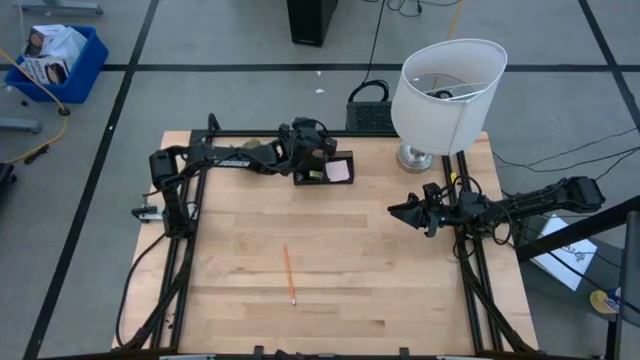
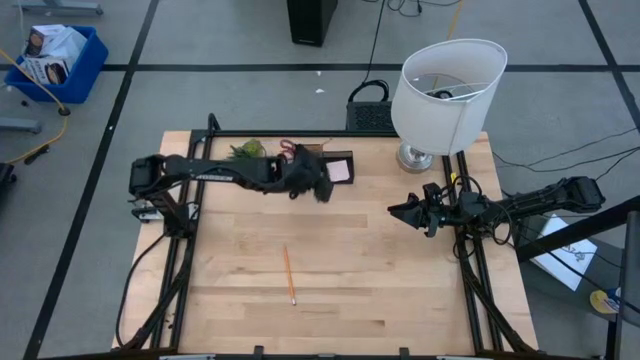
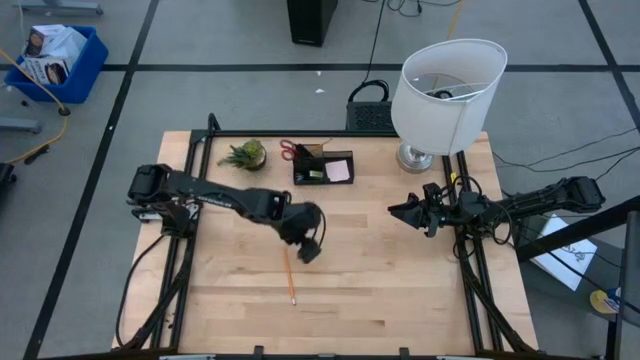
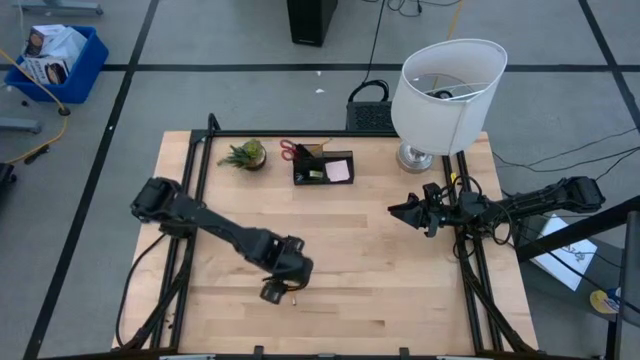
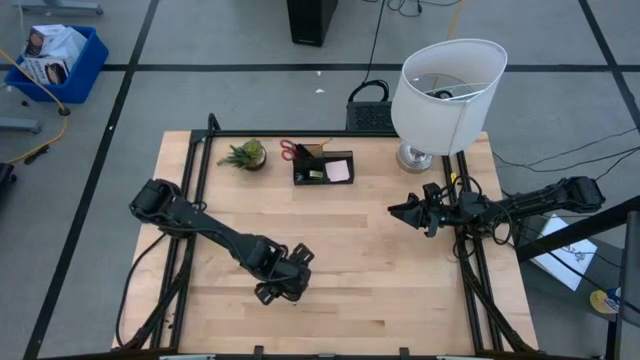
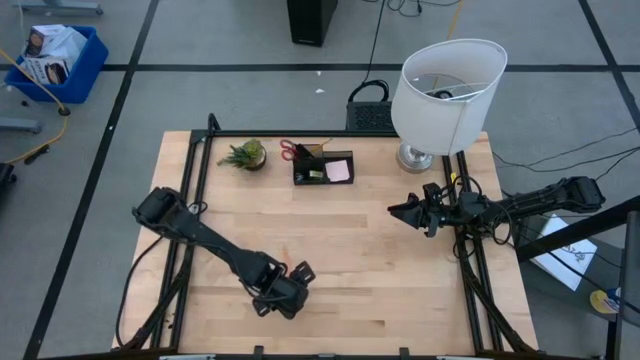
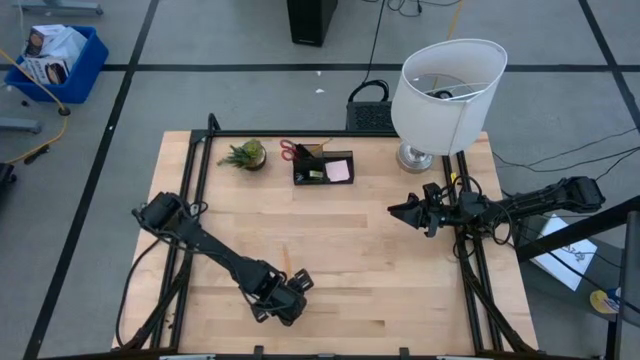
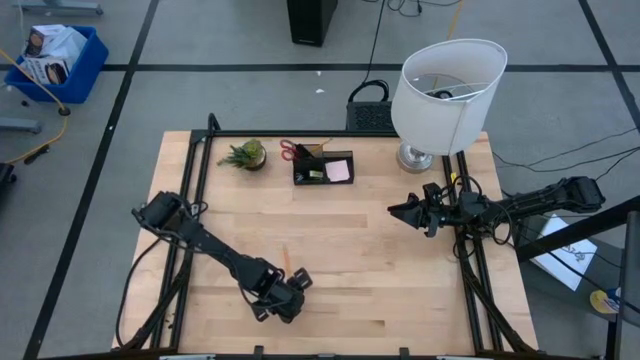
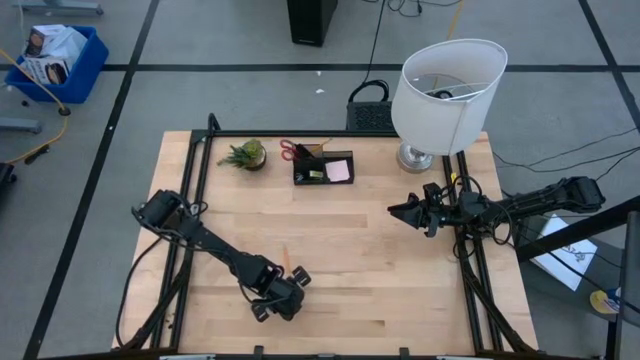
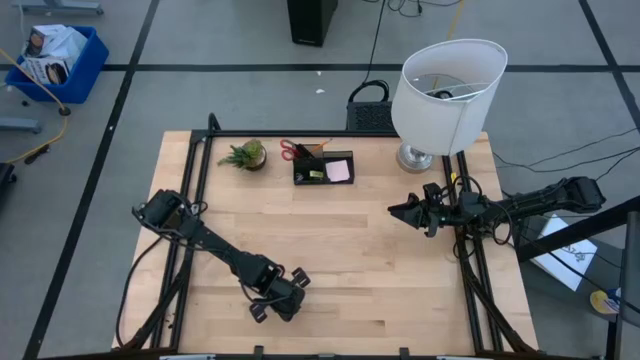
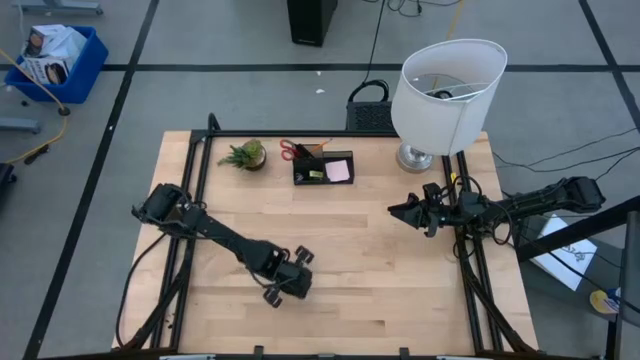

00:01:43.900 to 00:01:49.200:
Task: Pick and place office supplies into organizer
Put the orange pencil into the black desk organizer

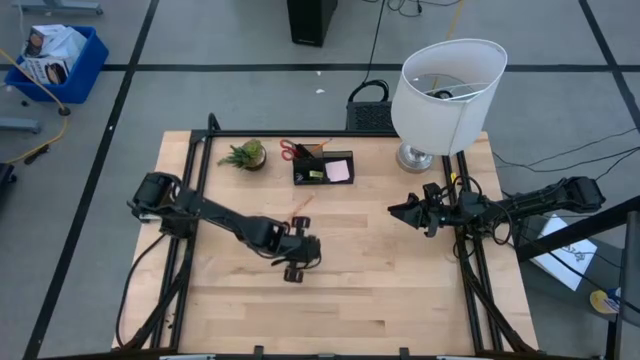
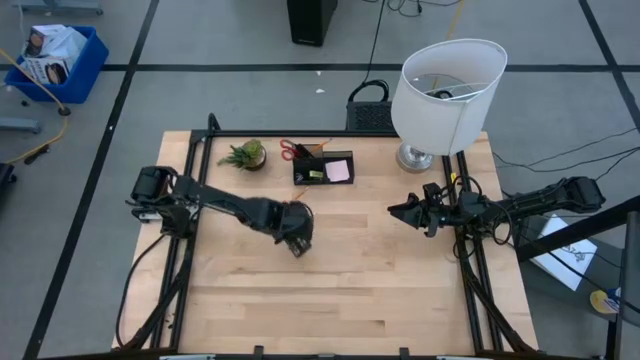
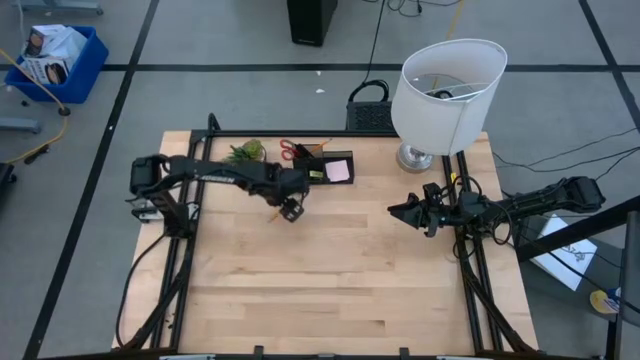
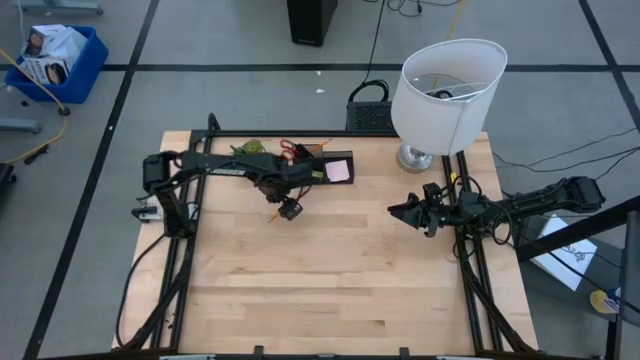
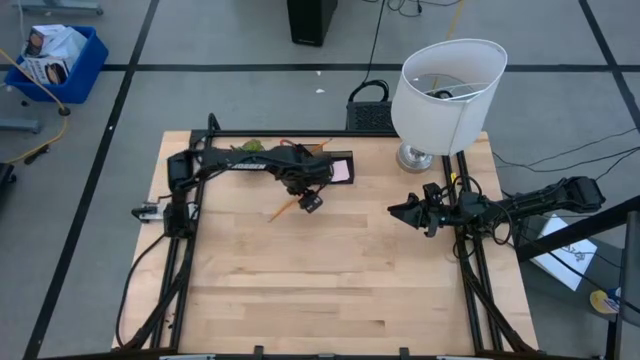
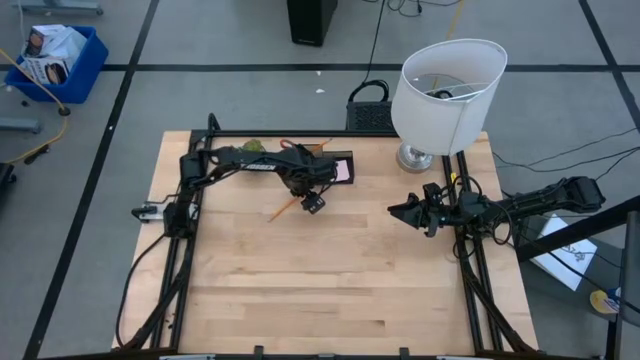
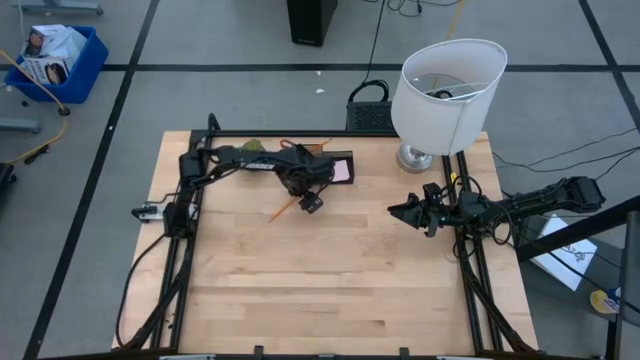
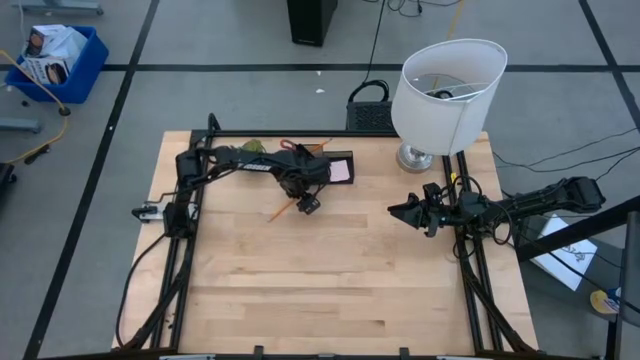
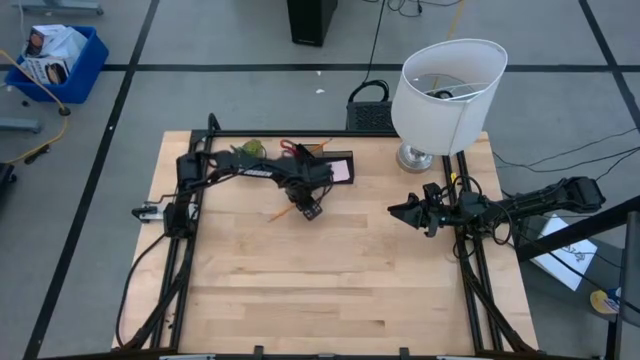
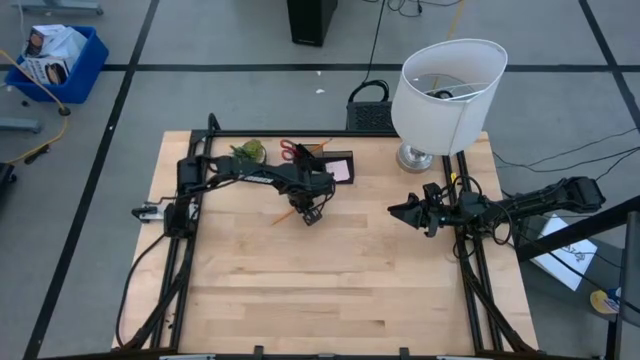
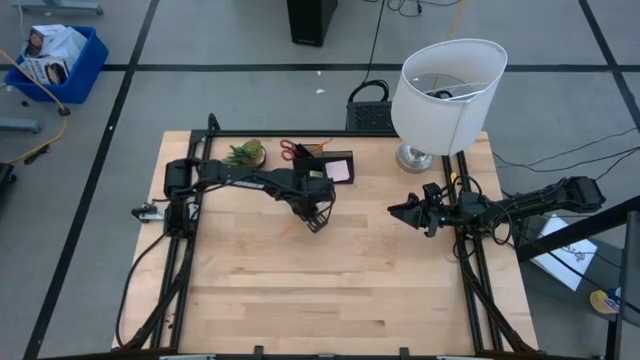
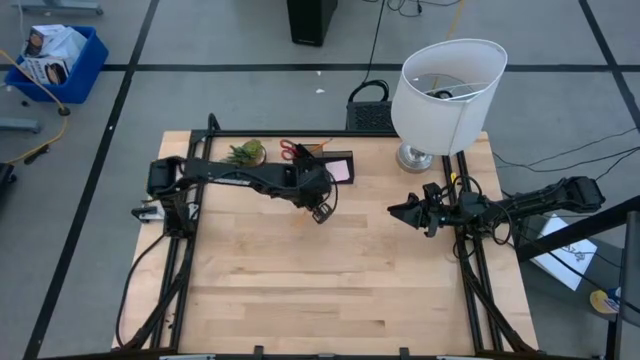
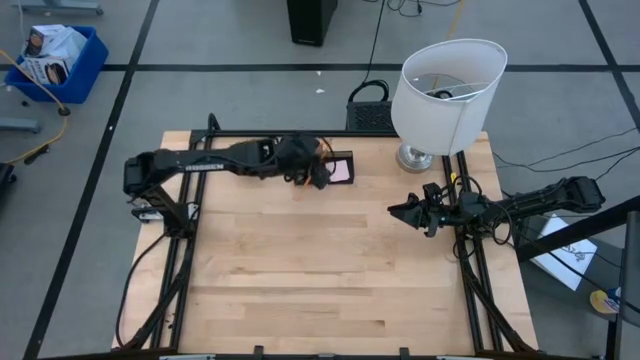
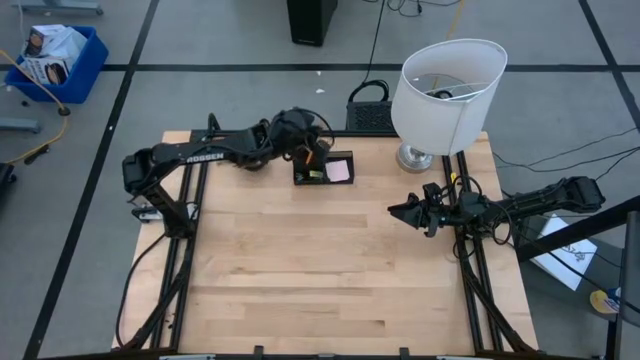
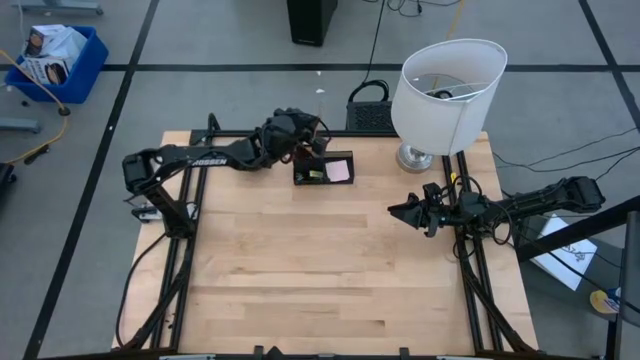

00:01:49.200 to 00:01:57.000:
Put the orange pencil into the black desk organizer

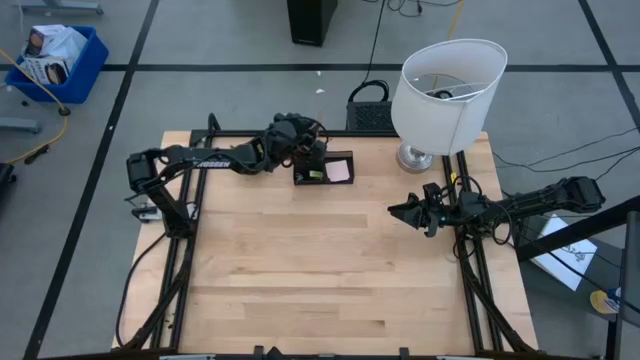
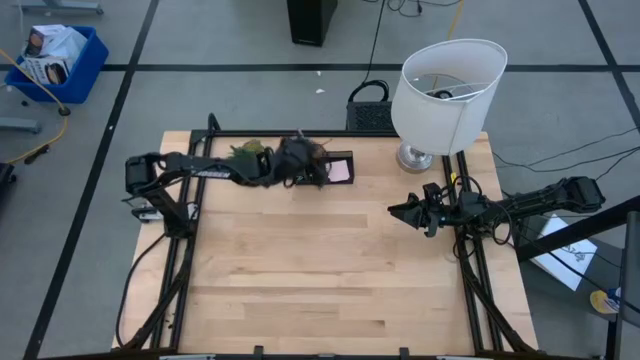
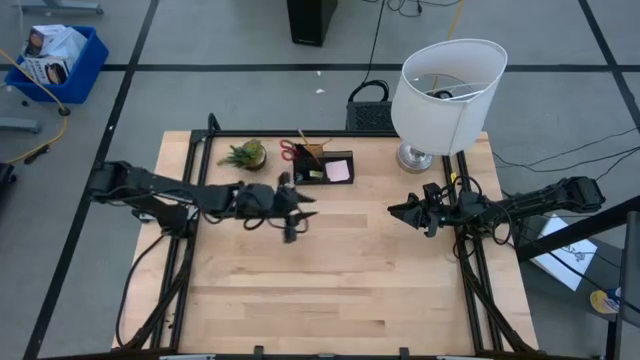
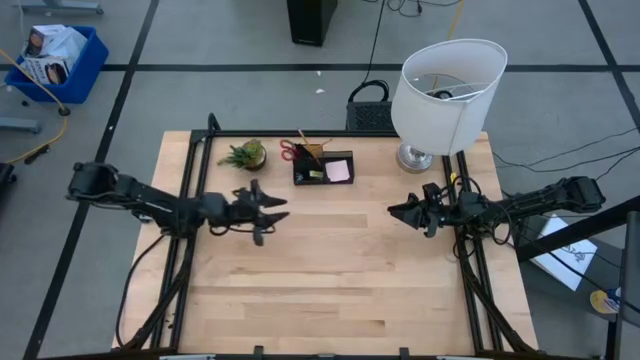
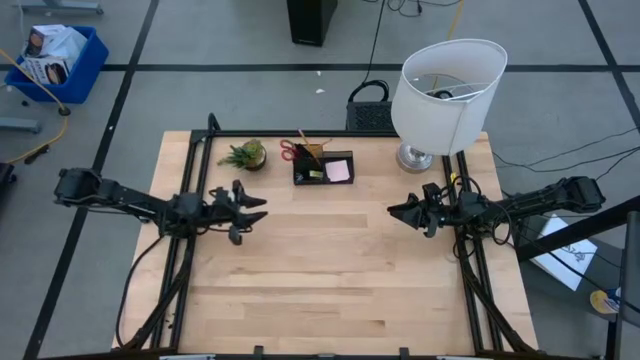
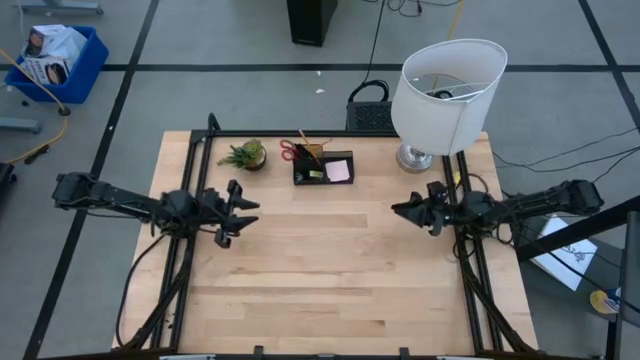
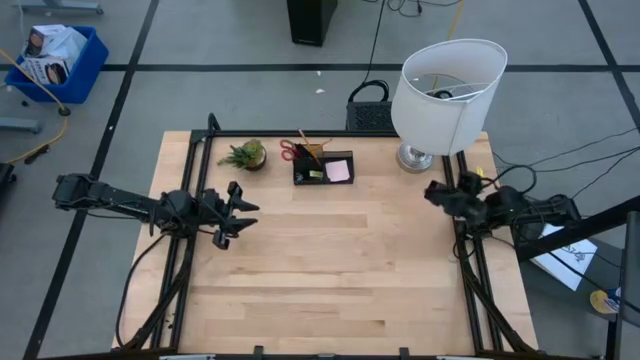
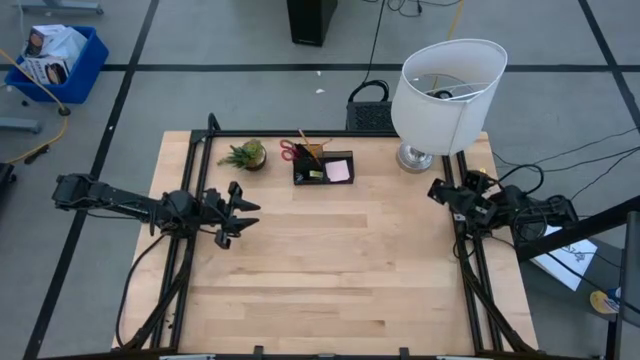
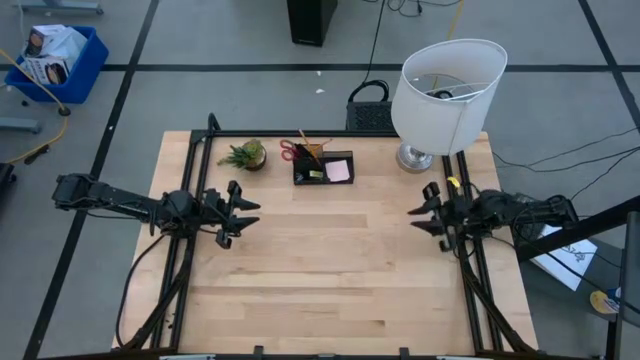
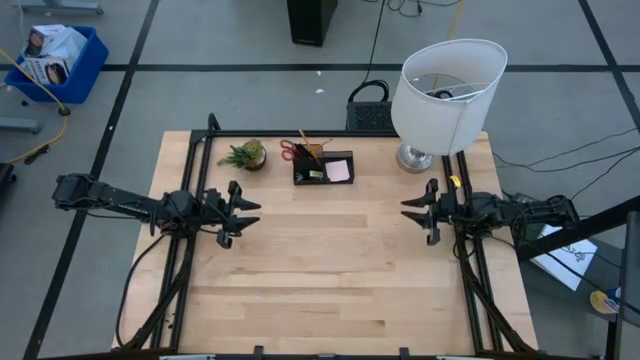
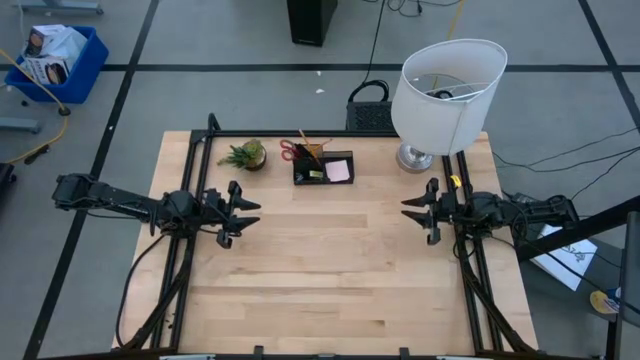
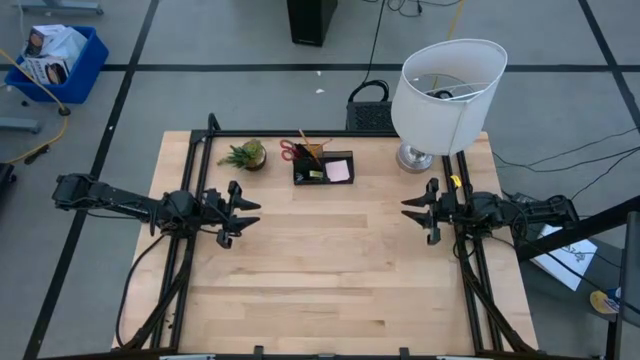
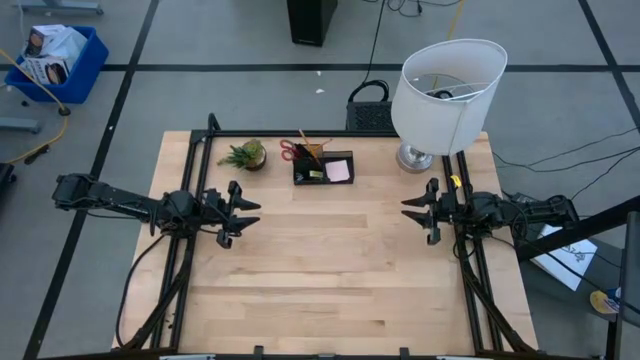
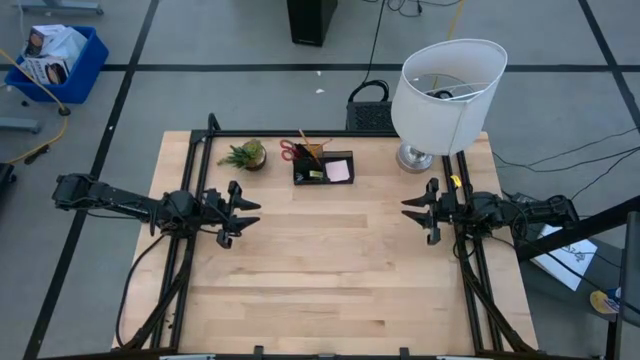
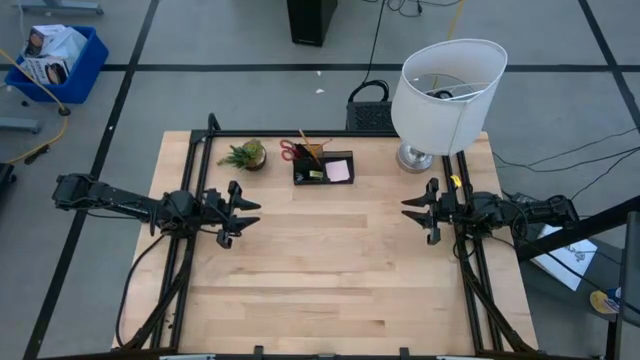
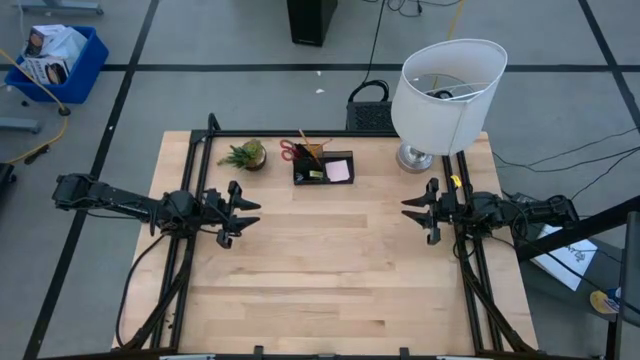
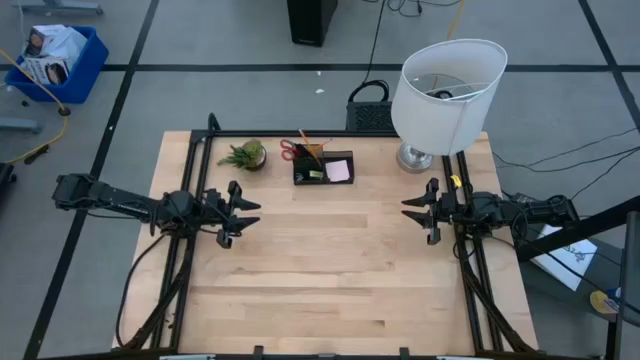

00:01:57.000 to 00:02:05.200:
Return to Home Position
